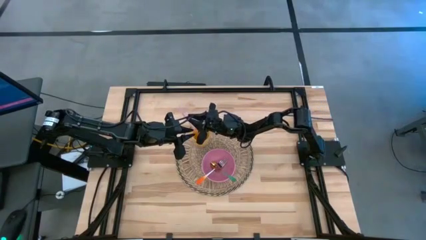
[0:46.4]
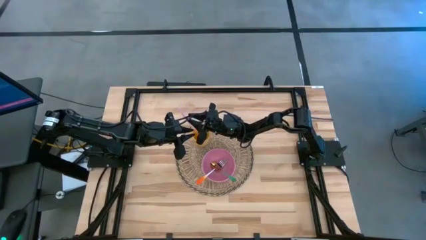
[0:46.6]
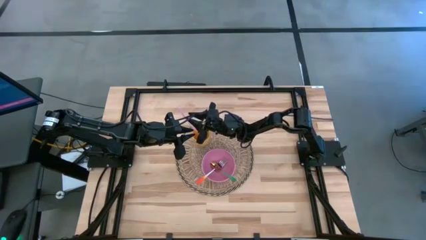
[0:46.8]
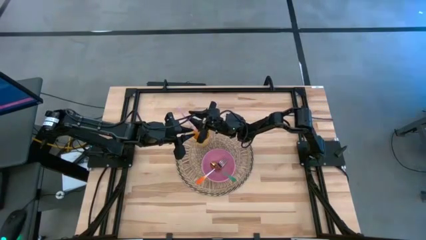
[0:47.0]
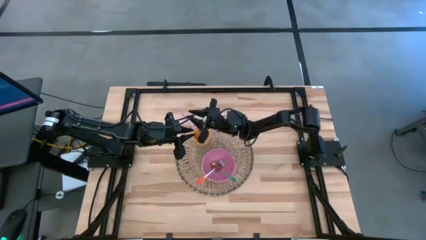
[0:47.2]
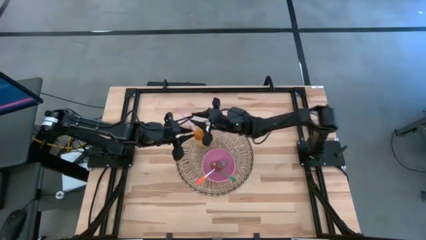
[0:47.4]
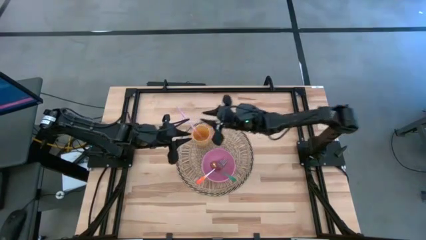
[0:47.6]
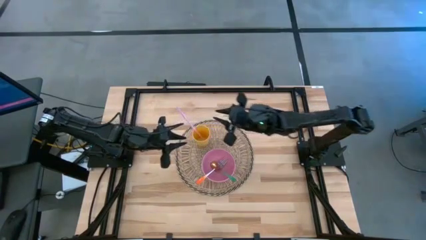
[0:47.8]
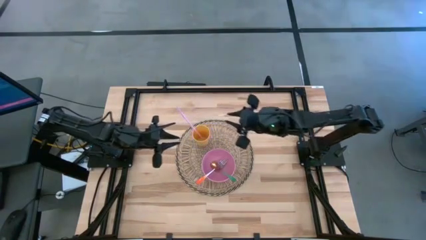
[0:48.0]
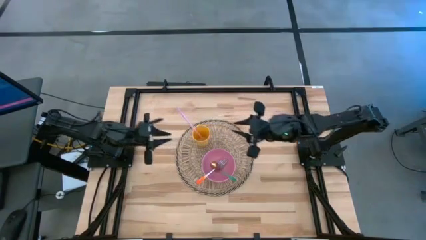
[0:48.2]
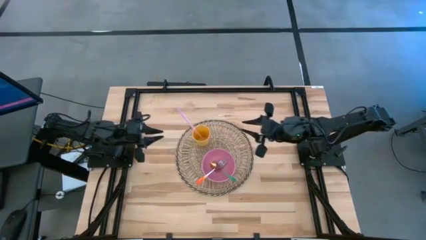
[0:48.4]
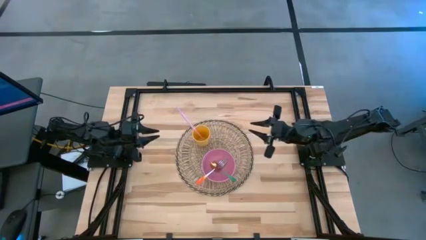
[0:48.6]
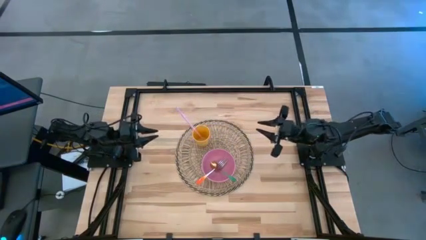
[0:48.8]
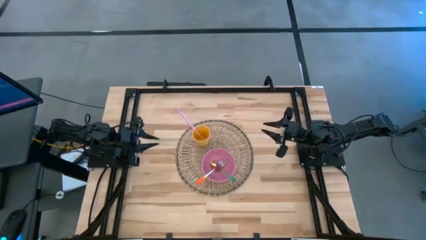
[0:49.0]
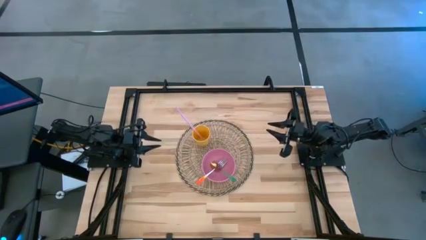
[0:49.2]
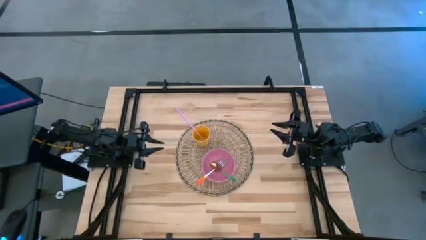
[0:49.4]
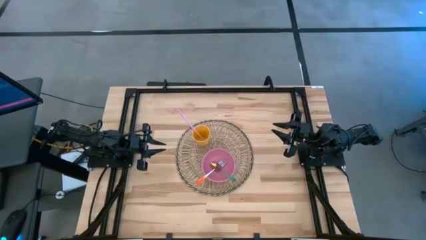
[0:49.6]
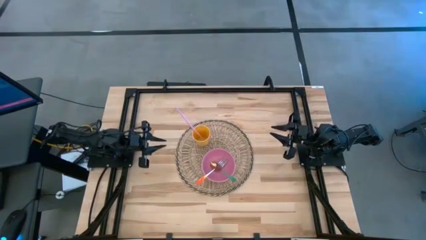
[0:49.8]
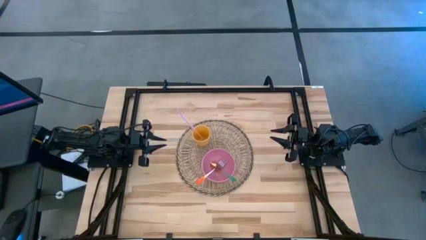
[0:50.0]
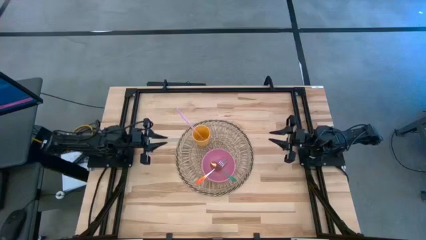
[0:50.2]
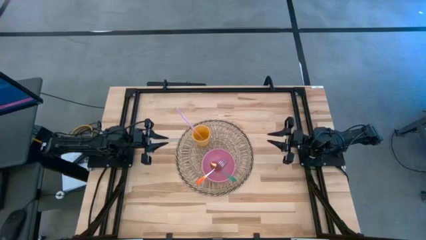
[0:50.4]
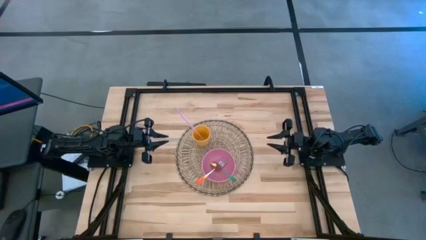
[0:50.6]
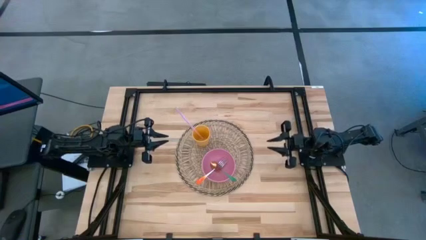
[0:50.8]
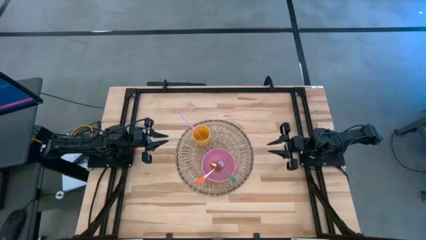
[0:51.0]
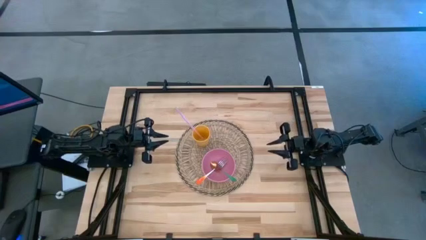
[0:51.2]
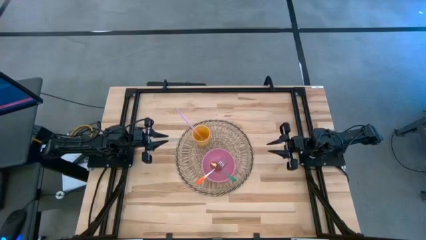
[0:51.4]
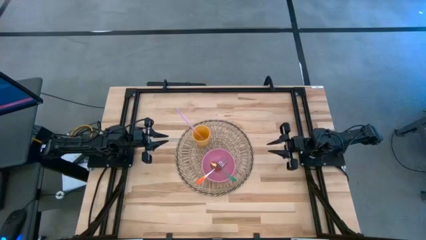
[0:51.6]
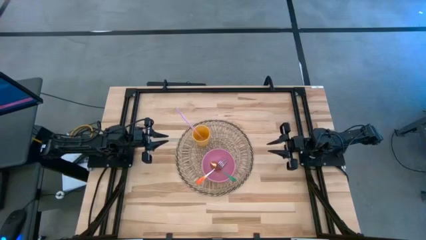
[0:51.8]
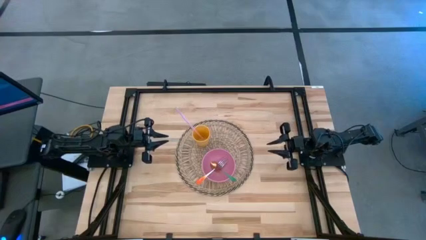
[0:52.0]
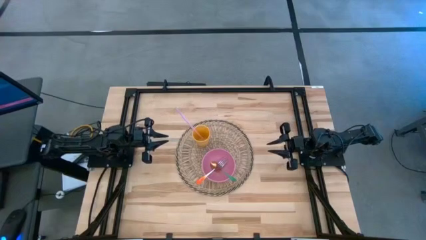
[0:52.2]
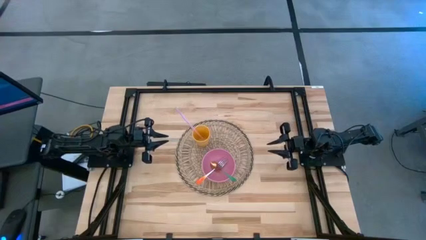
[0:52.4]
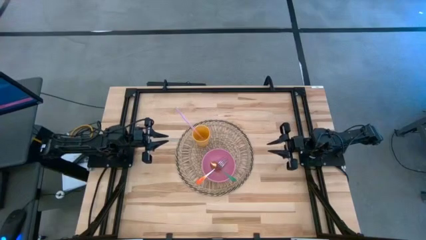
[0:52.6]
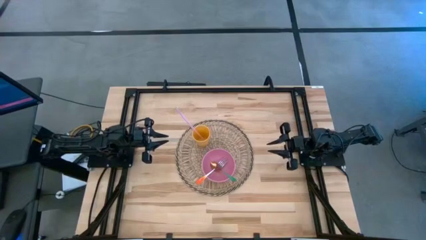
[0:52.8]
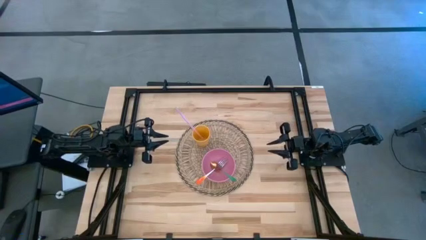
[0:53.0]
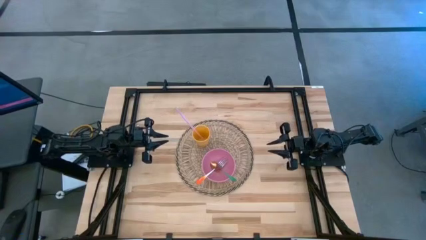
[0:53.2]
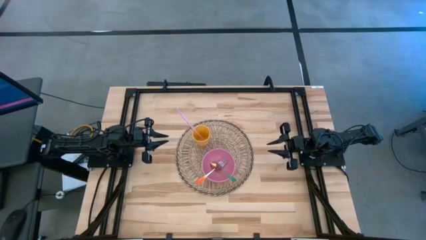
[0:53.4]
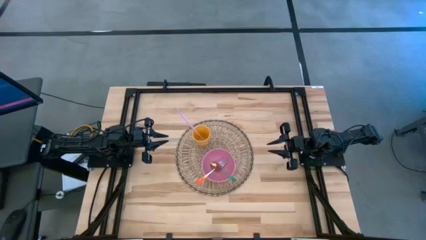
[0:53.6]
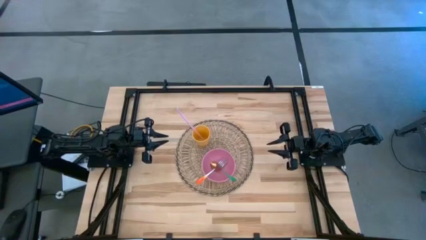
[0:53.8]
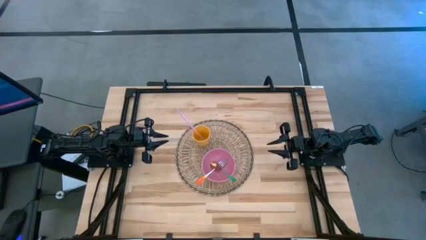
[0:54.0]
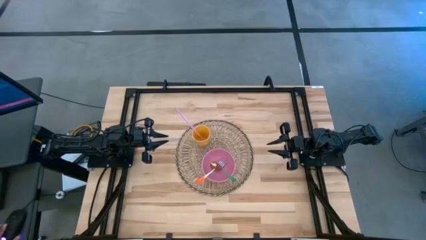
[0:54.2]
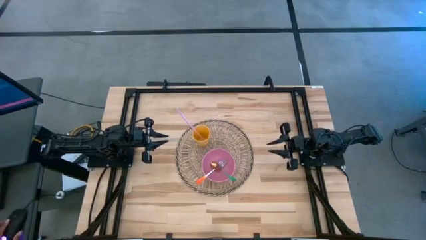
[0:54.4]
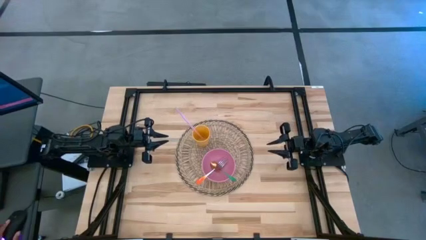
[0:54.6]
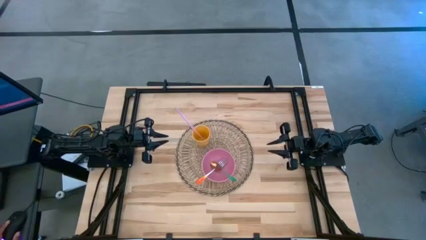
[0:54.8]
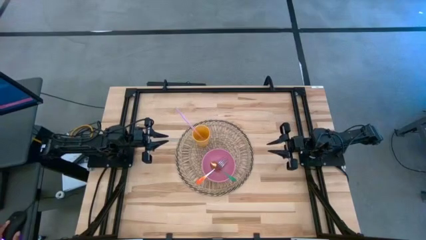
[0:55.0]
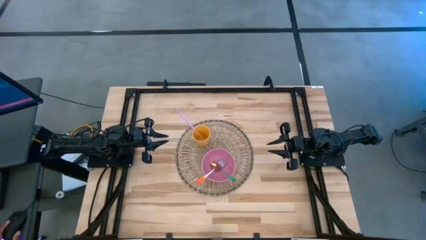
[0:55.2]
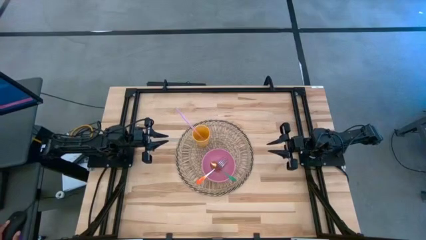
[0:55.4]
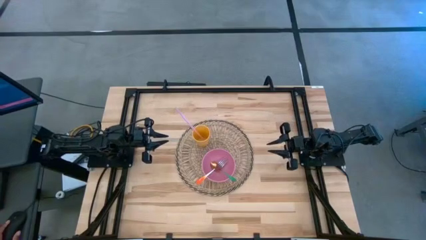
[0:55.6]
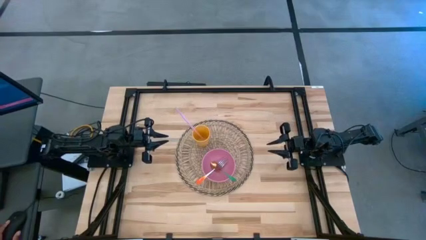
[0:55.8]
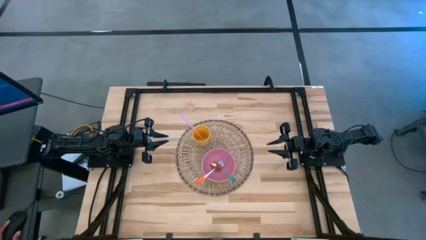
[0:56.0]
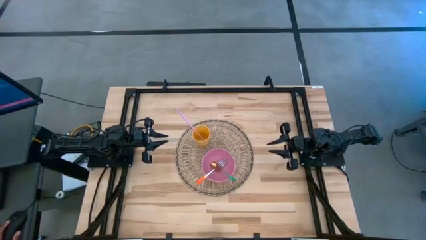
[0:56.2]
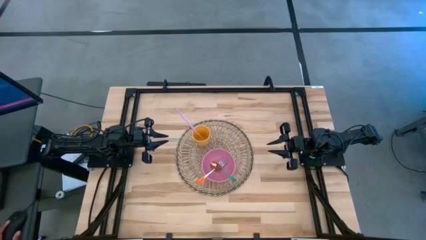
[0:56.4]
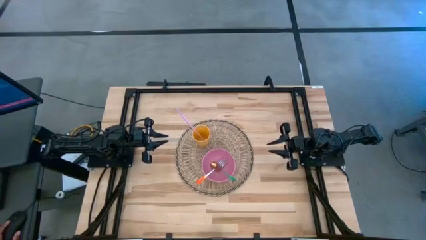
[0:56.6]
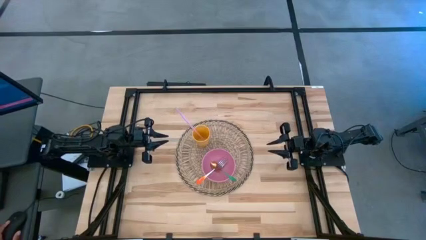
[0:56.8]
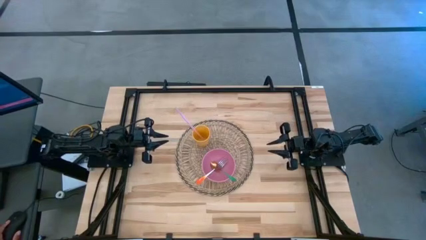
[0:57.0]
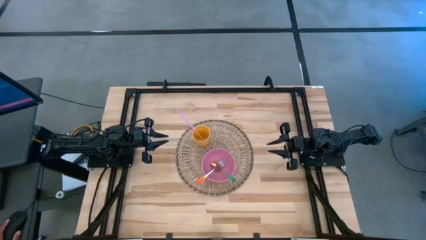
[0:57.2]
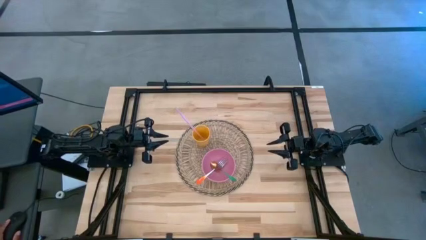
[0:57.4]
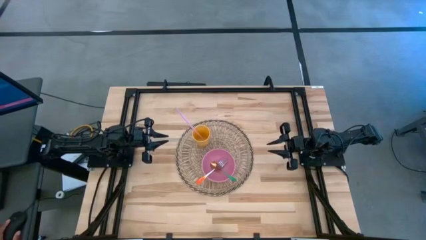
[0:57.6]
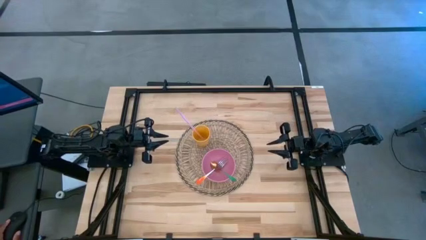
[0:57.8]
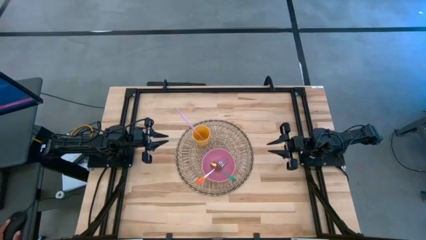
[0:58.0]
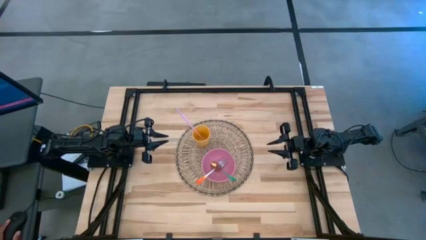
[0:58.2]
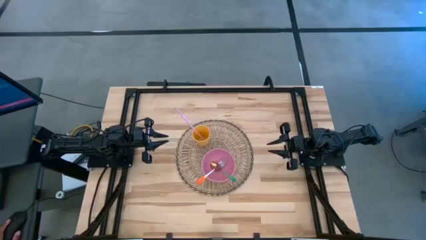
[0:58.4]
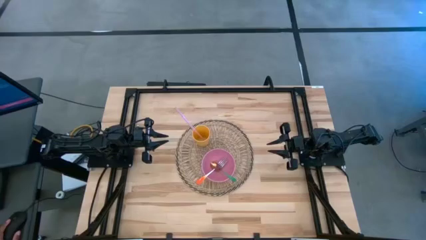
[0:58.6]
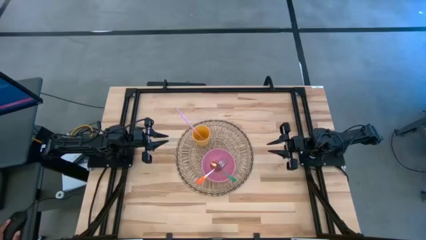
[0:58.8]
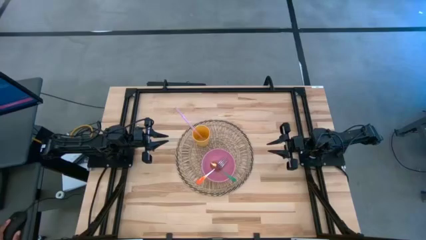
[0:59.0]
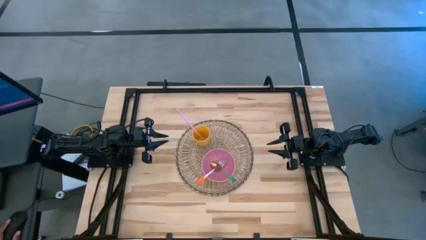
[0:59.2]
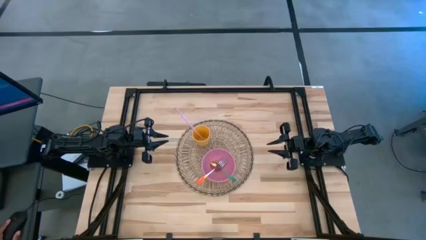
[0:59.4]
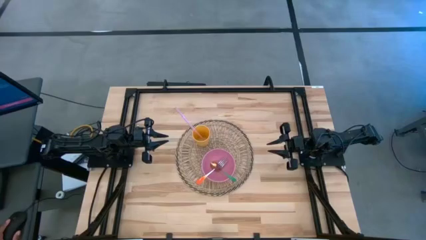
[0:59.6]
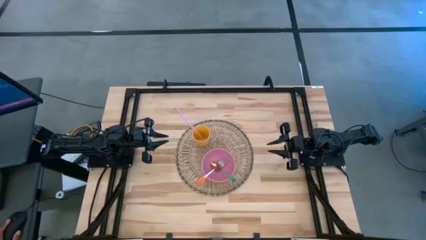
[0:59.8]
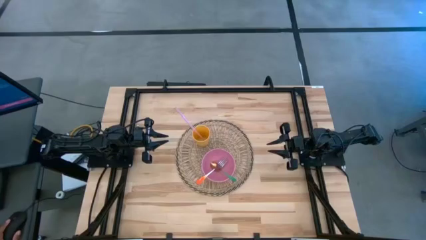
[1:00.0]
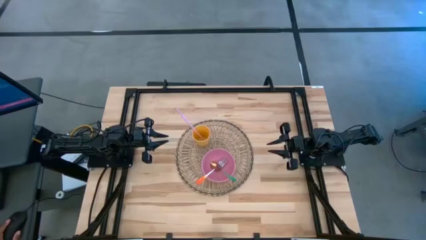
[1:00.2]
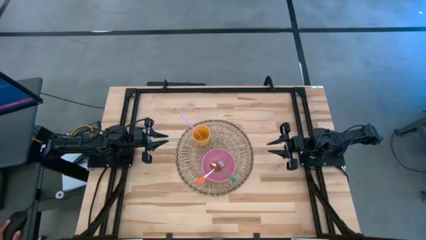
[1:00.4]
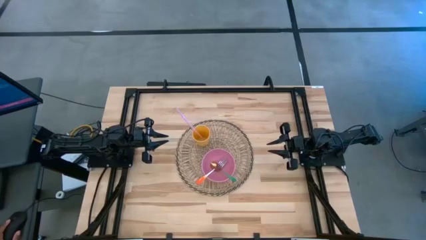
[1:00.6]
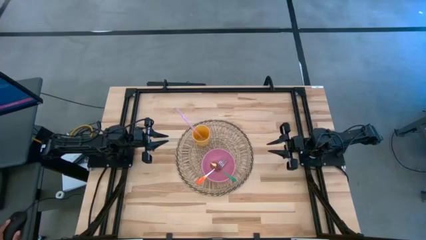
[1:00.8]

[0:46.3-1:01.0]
Task: Pick & Place Utensil
Return to Home Position
